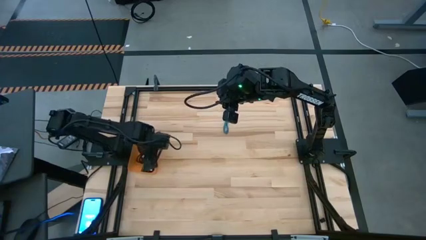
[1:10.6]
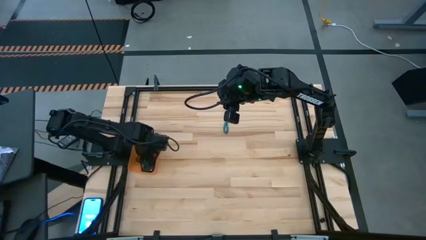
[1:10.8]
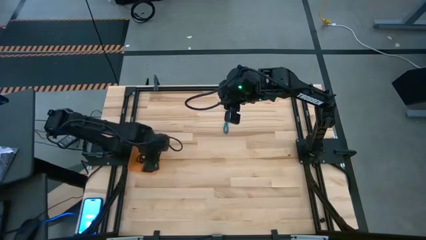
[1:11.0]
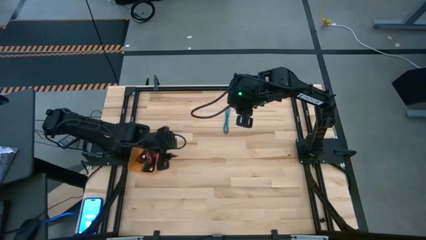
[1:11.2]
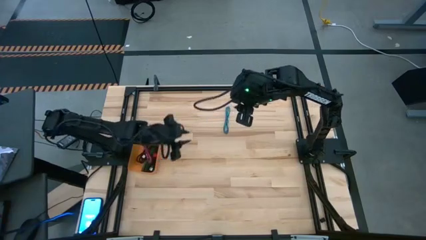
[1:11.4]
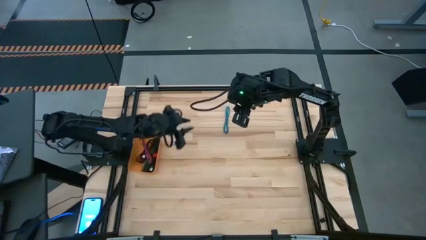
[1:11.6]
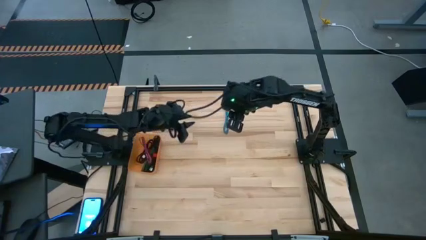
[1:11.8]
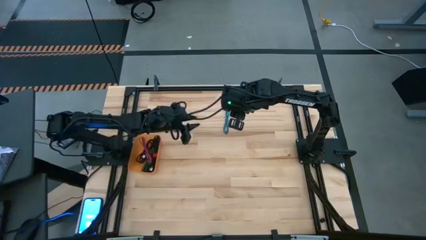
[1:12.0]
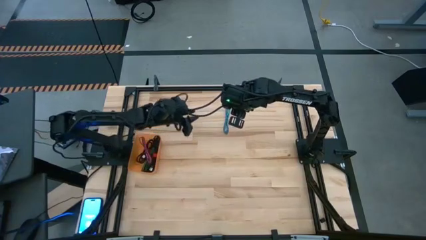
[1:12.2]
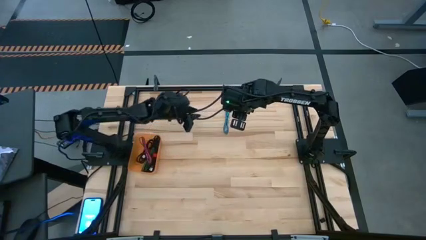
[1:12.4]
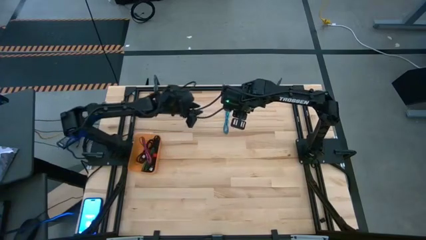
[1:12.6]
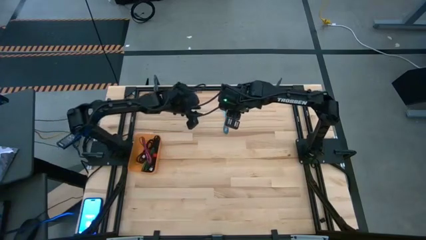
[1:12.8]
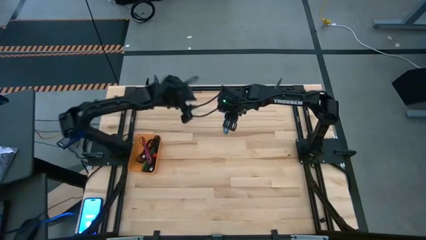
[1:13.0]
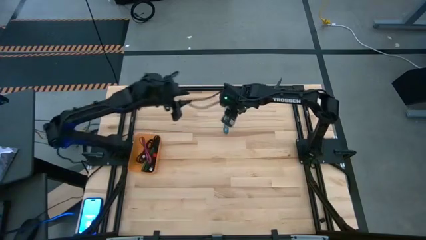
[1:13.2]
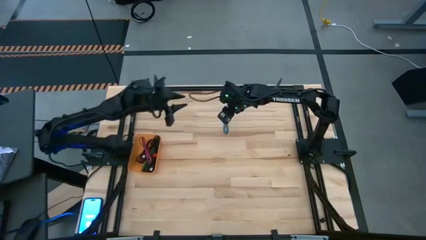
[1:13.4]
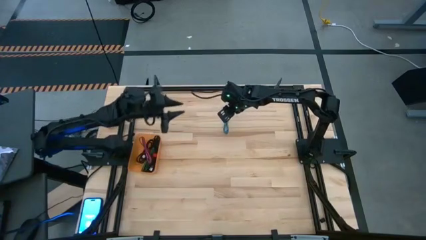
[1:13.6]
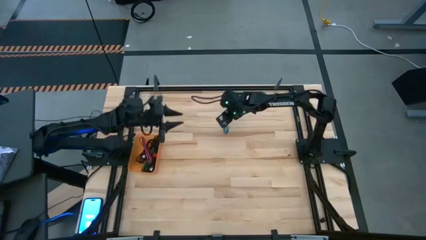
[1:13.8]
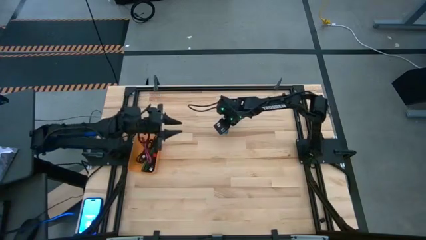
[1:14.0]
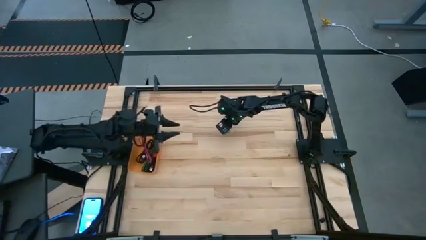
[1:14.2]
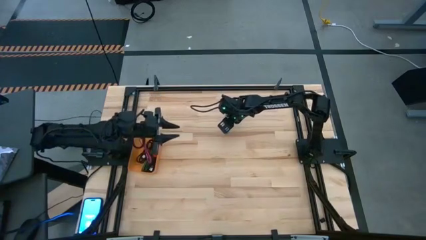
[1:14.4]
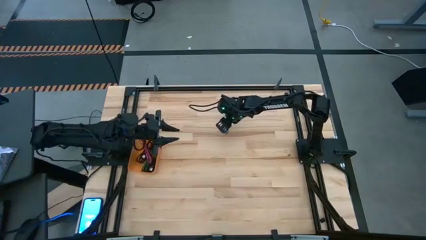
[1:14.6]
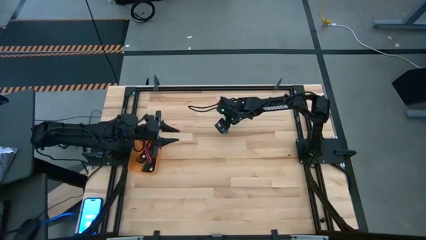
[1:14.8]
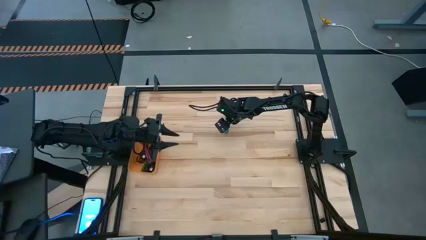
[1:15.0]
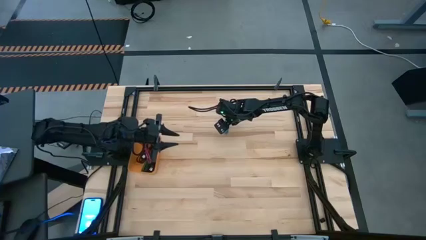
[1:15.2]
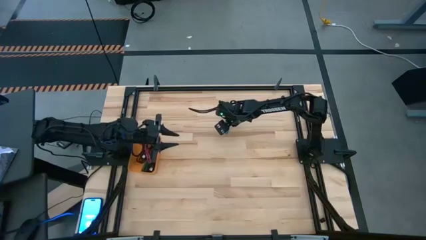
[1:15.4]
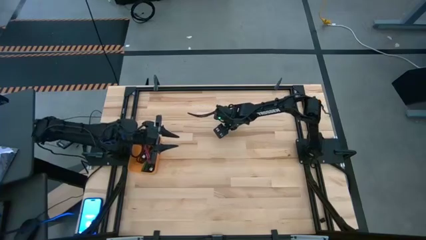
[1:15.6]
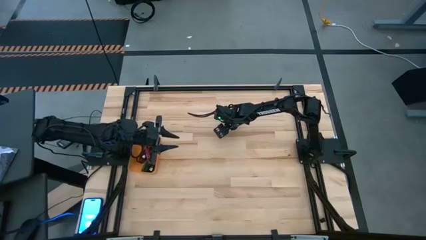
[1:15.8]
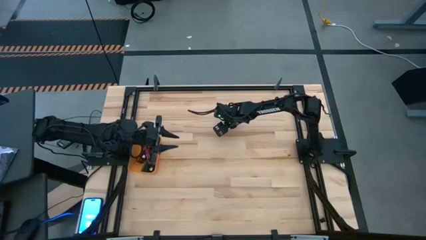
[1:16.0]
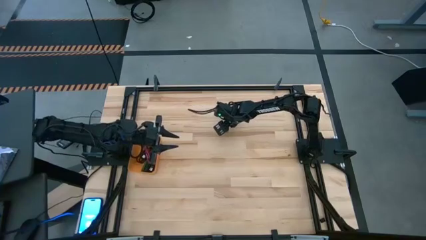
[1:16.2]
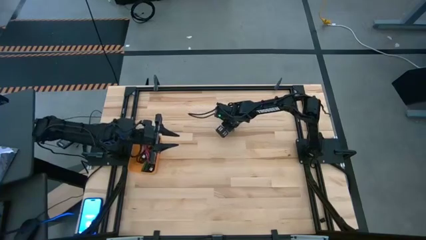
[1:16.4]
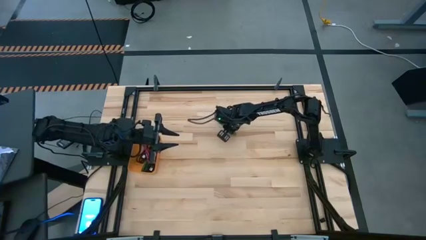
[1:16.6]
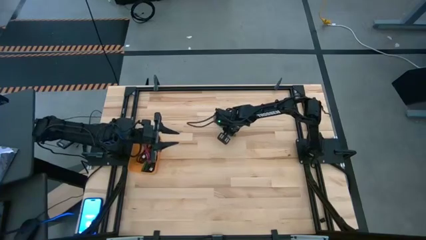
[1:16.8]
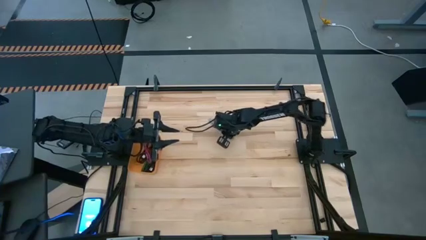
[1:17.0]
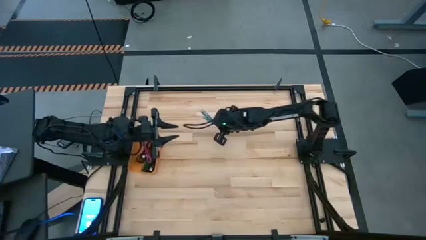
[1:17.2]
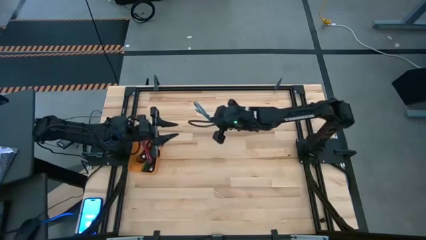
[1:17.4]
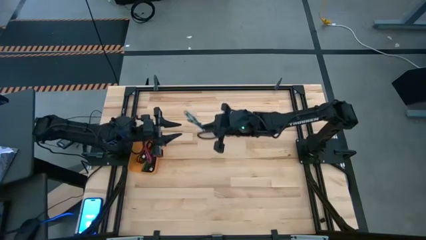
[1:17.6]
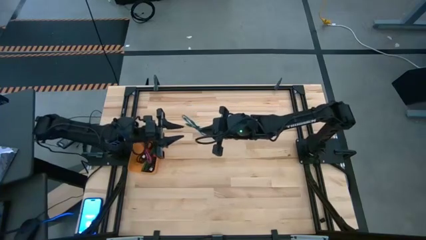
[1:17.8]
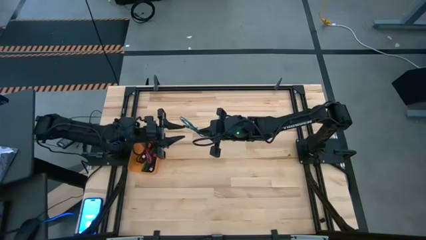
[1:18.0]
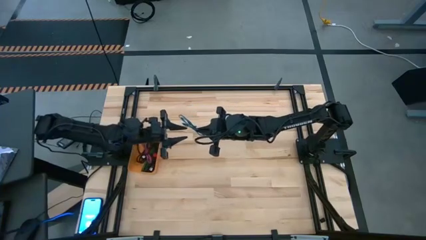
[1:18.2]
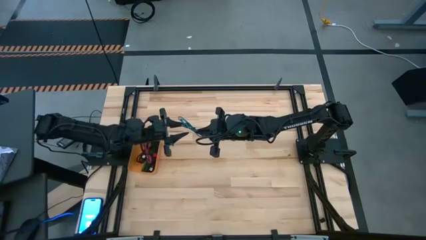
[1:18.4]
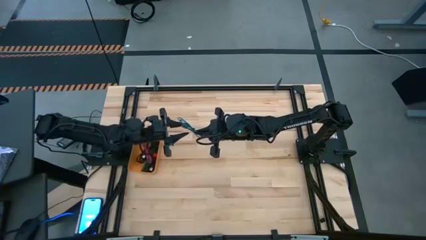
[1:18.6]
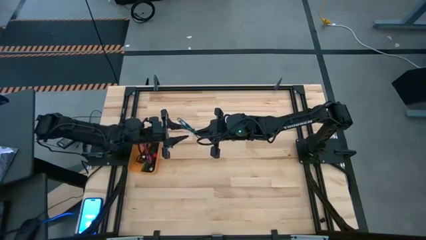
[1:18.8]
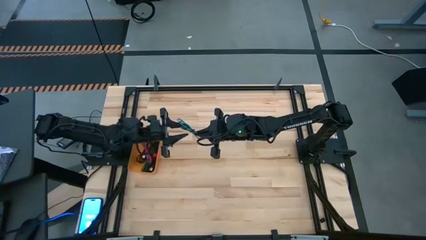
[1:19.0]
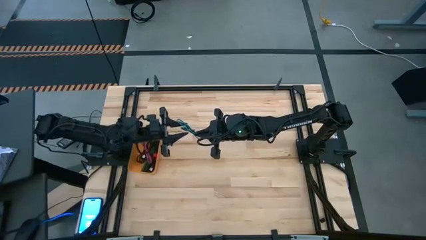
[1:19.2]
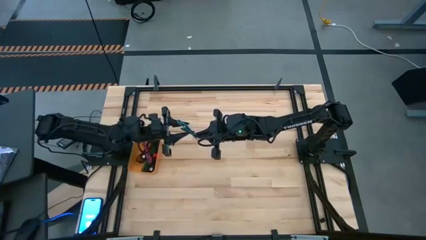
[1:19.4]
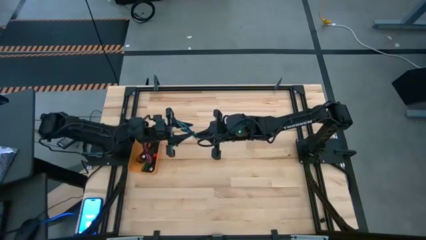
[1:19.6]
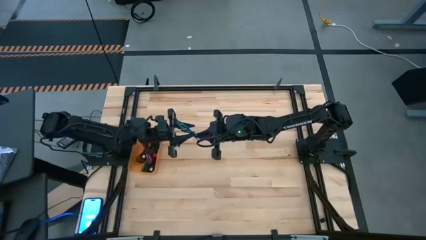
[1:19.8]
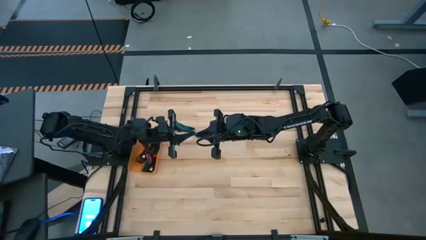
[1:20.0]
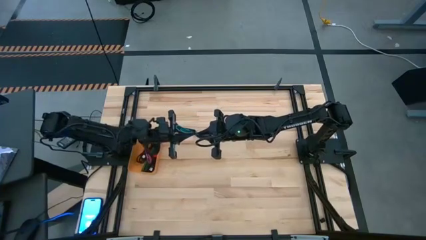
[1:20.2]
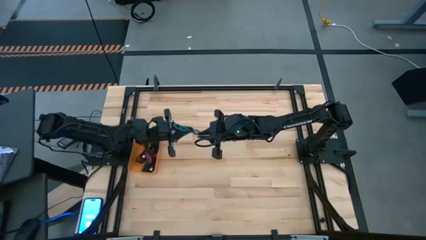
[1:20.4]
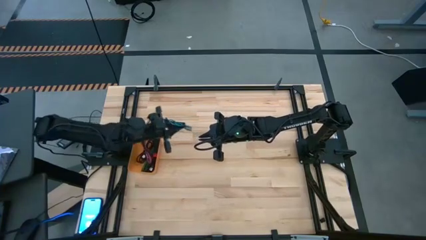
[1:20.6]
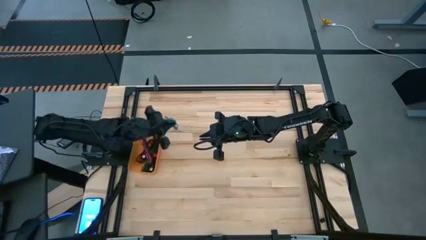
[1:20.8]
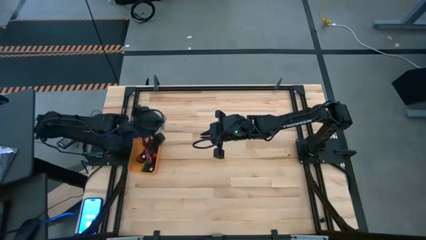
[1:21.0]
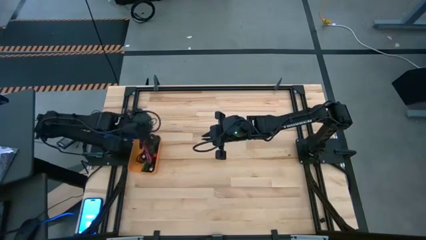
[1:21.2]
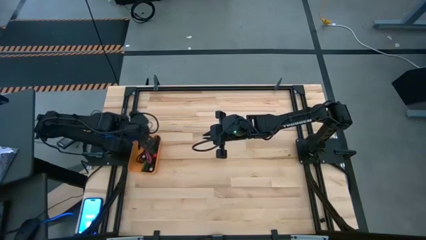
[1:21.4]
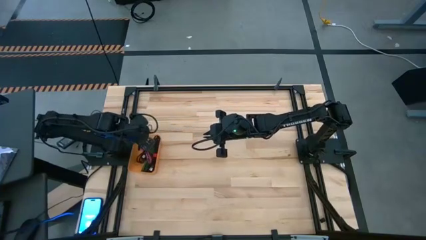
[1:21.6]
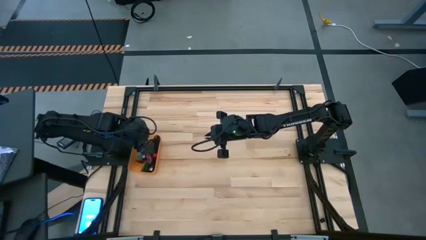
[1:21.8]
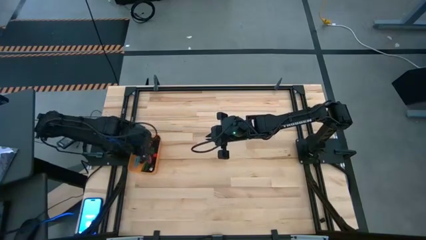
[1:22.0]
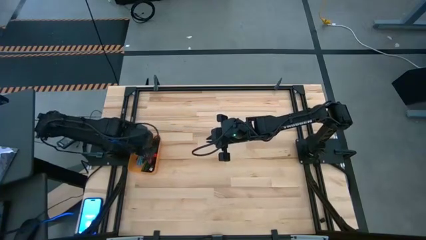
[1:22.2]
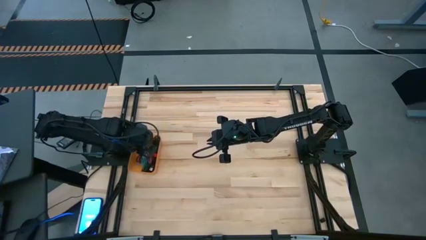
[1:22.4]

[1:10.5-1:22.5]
Task: Pick and place USB-C Cables
Put the blue USB cable into the orange bin

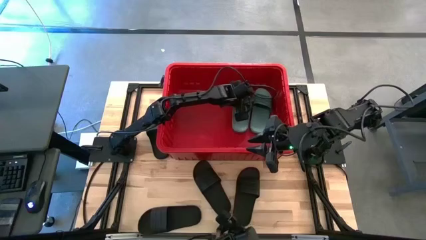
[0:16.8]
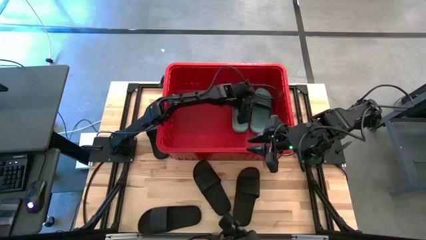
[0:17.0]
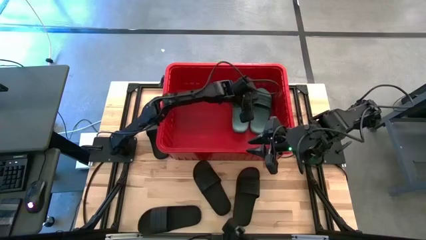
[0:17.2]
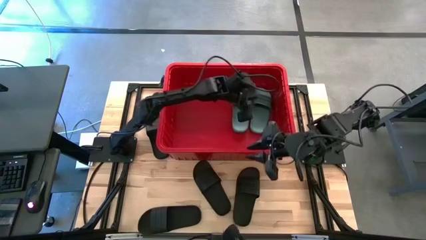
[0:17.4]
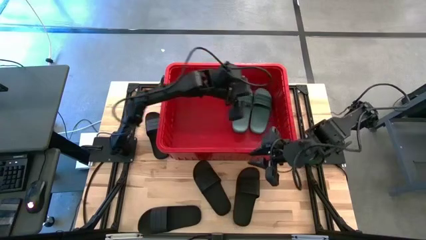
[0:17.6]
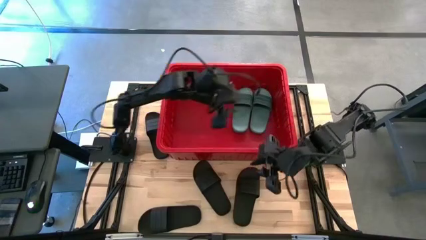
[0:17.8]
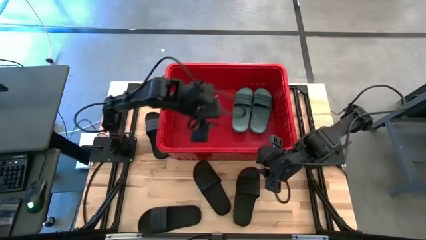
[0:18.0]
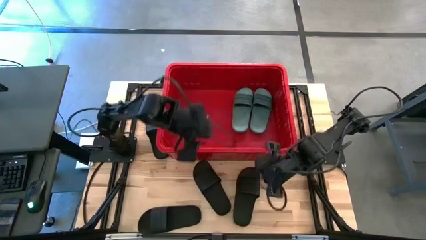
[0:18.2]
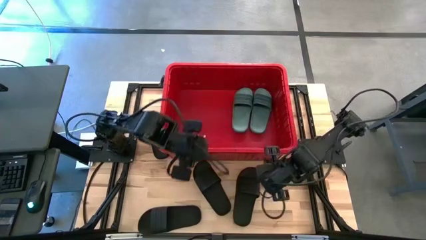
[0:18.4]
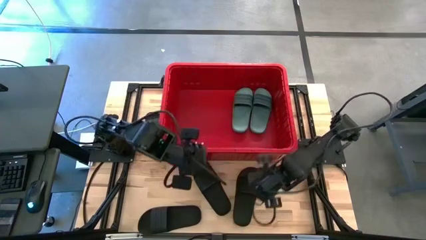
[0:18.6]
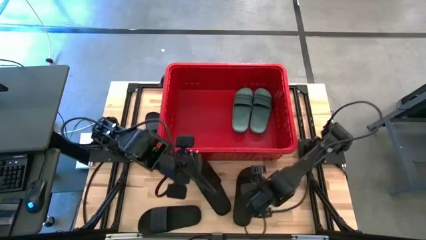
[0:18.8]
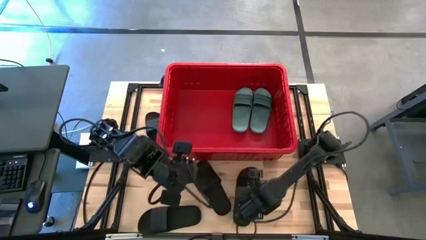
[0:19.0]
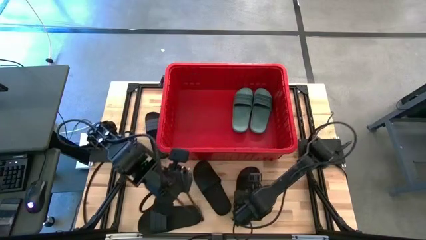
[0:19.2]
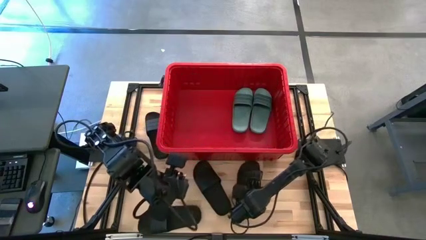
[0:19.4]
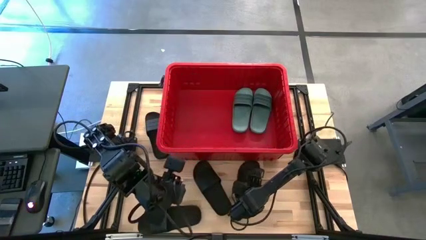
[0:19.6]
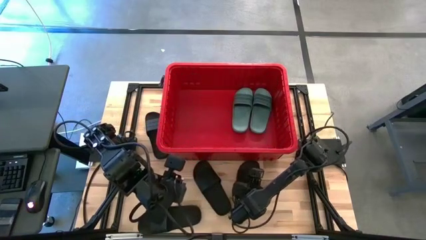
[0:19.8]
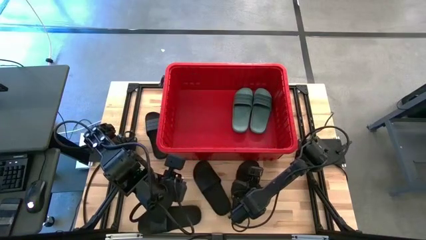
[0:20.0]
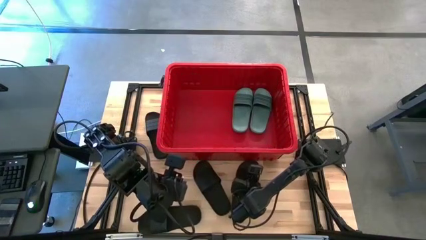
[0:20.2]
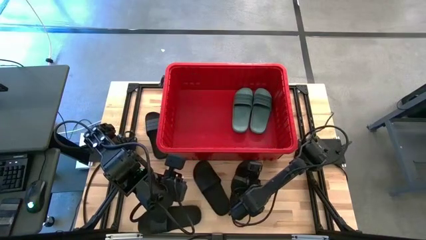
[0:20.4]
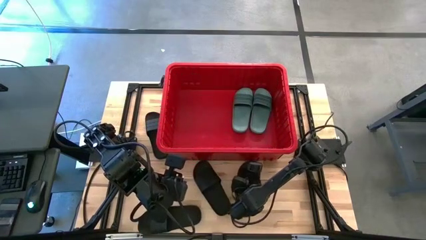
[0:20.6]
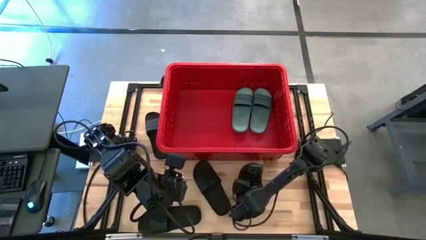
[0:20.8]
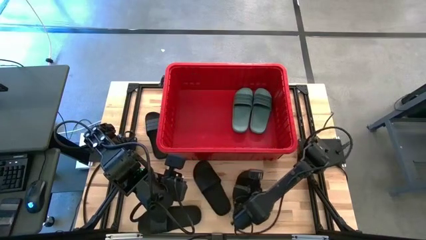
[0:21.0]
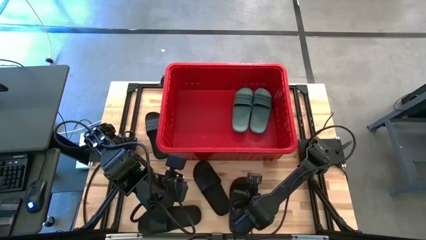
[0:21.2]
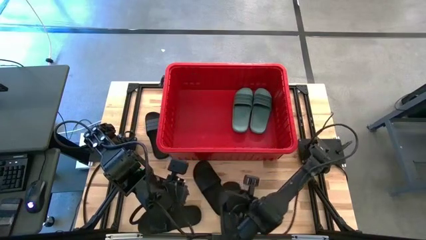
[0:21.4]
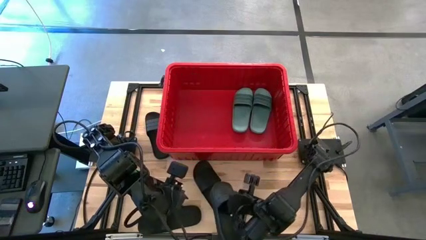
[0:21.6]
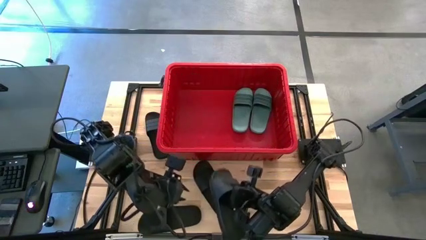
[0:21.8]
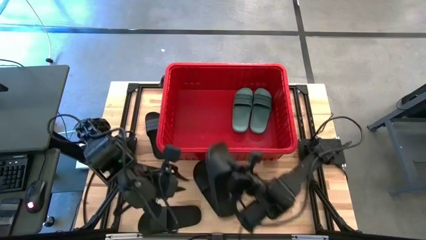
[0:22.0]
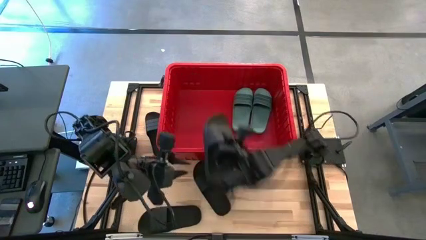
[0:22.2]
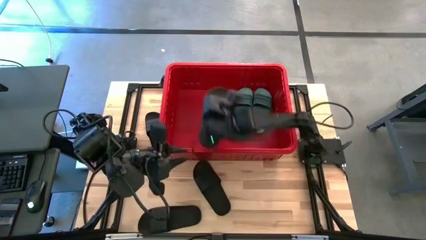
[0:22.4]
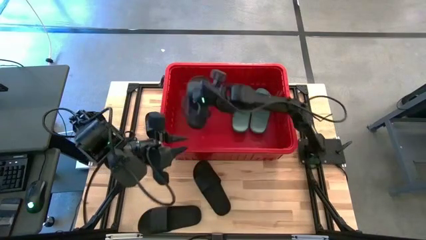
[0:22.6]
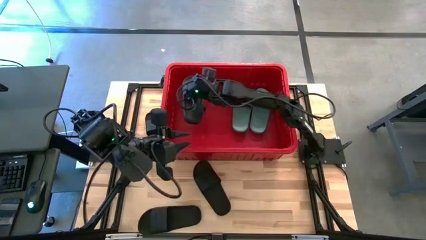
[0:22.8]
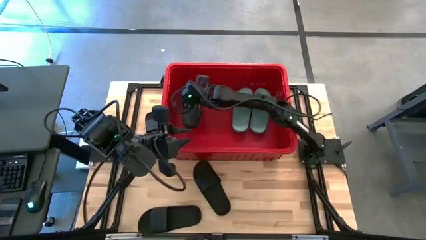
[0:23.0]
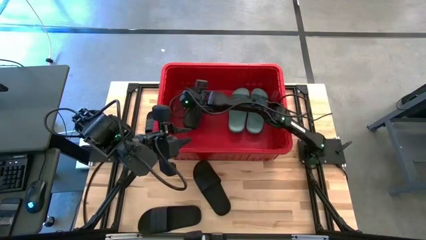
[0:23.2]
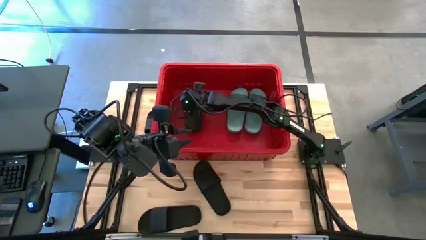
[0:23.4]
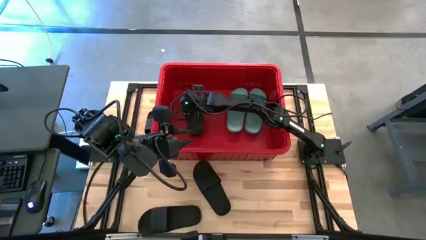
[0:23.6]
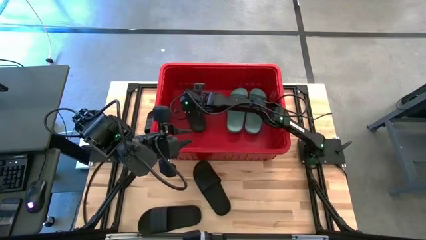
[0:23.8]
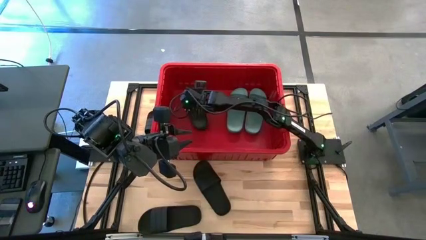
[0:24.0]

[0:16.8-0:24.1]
Task: Pick and place slides into bin
Put the black slipper into the red bin
